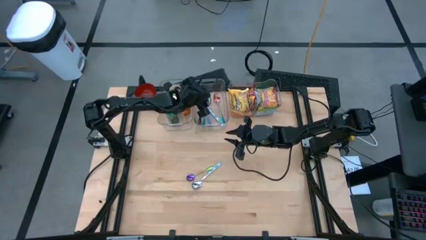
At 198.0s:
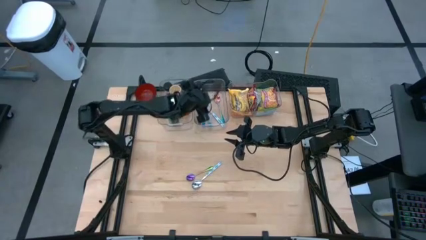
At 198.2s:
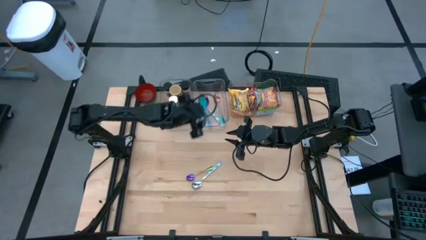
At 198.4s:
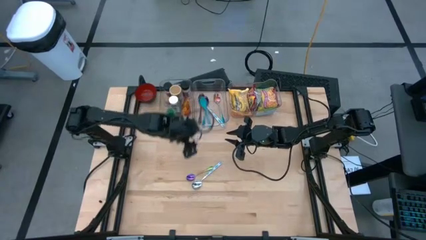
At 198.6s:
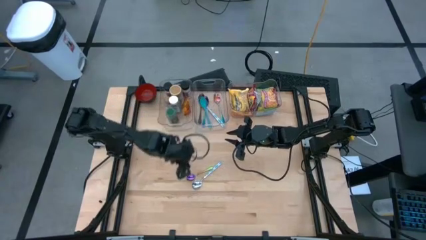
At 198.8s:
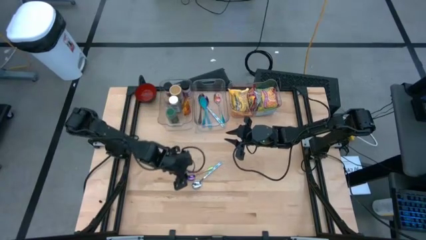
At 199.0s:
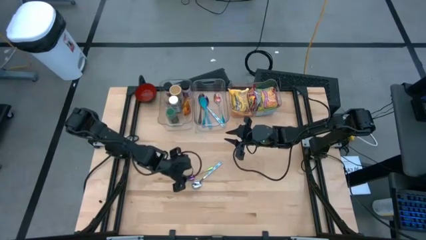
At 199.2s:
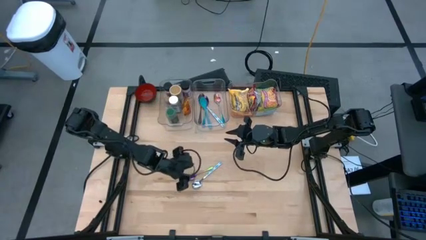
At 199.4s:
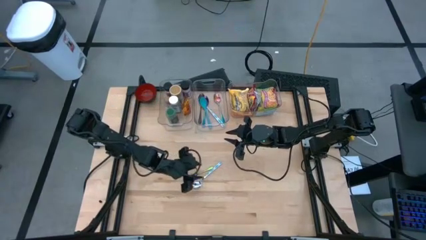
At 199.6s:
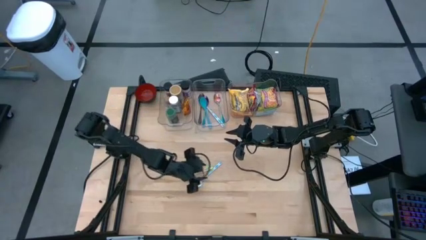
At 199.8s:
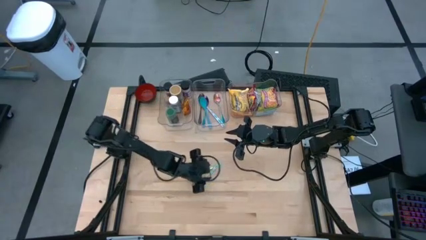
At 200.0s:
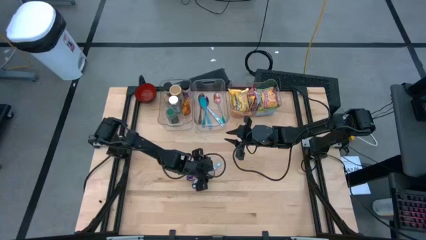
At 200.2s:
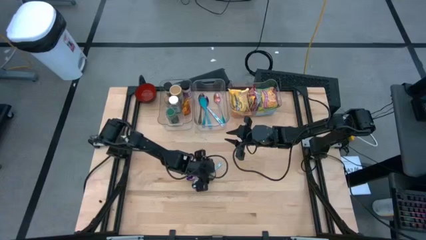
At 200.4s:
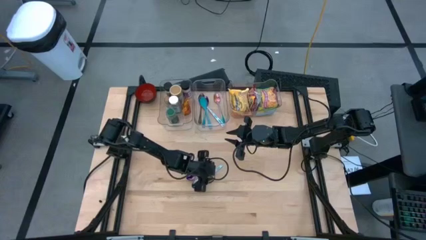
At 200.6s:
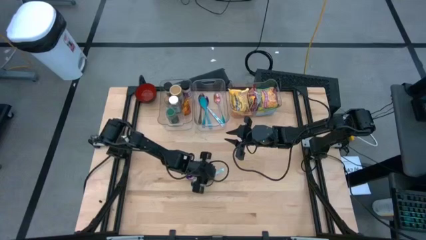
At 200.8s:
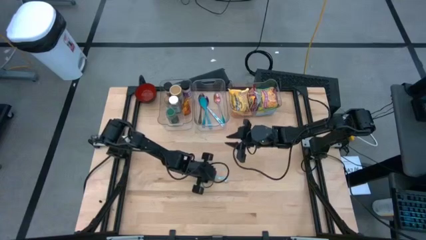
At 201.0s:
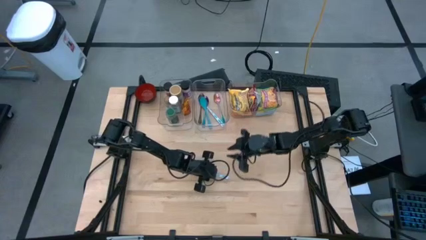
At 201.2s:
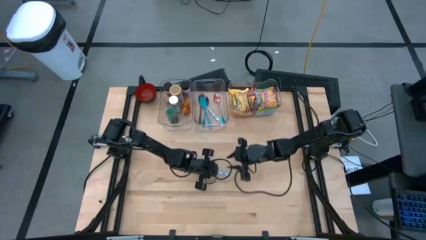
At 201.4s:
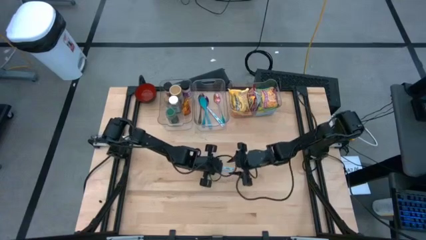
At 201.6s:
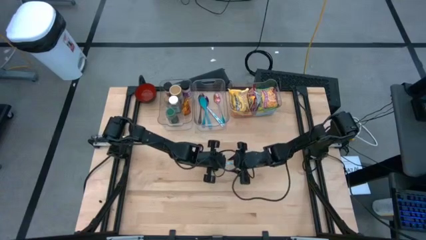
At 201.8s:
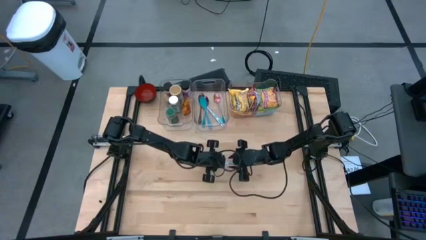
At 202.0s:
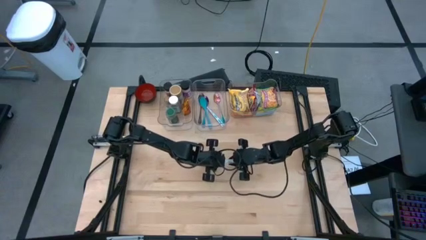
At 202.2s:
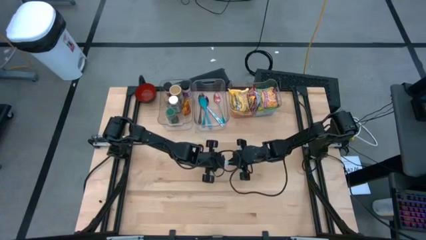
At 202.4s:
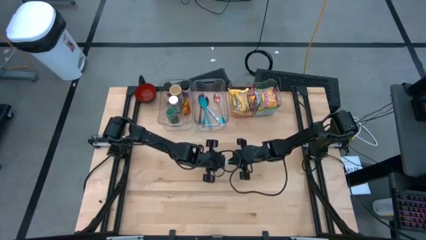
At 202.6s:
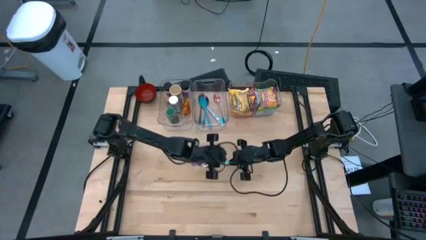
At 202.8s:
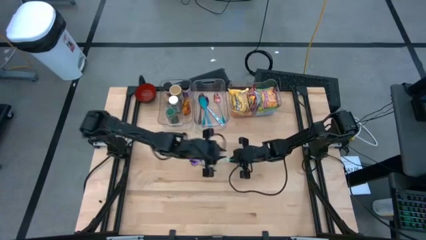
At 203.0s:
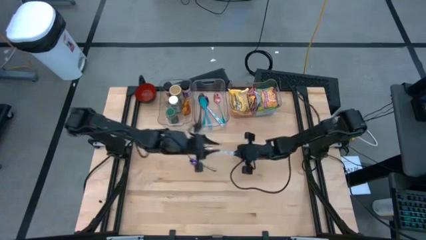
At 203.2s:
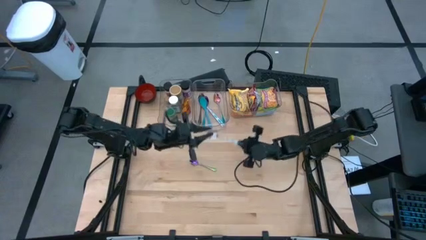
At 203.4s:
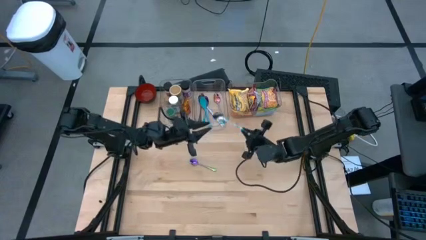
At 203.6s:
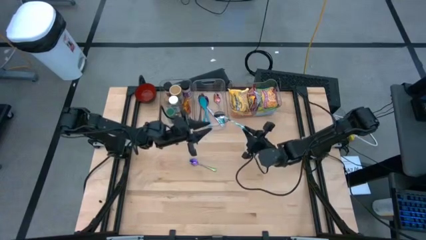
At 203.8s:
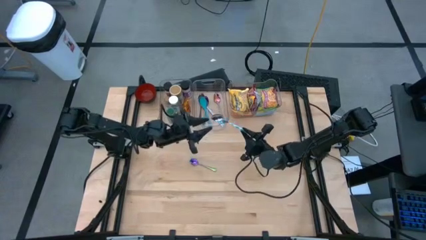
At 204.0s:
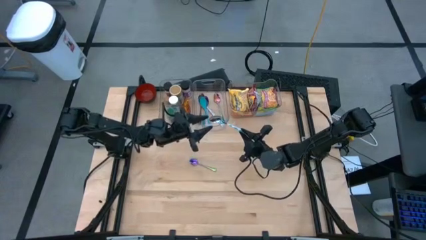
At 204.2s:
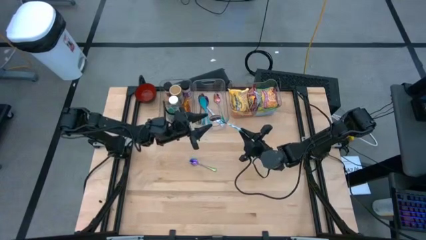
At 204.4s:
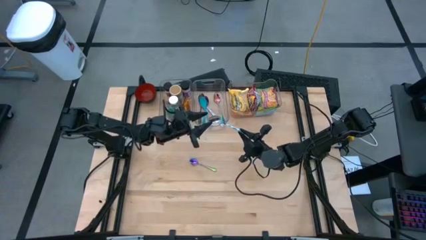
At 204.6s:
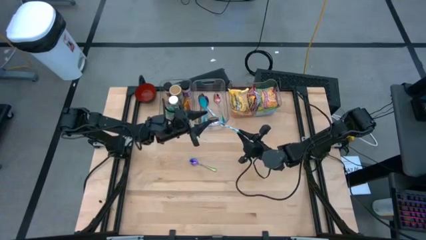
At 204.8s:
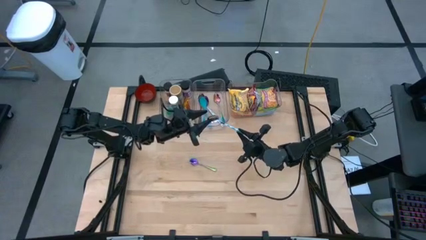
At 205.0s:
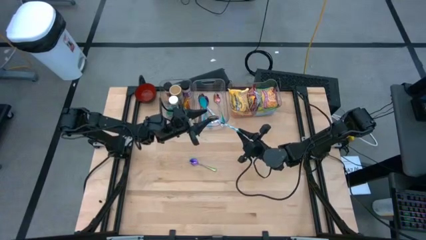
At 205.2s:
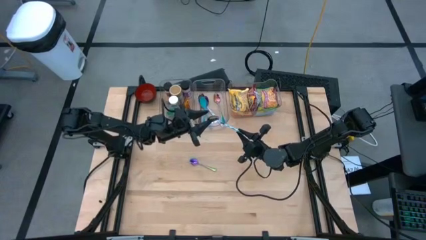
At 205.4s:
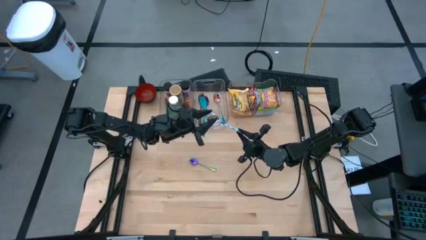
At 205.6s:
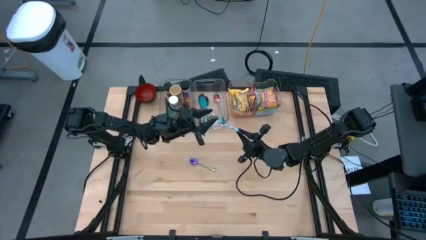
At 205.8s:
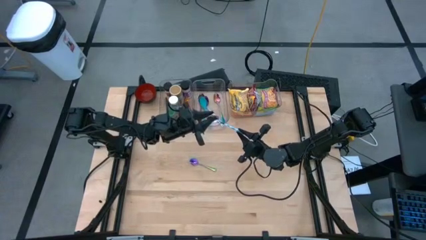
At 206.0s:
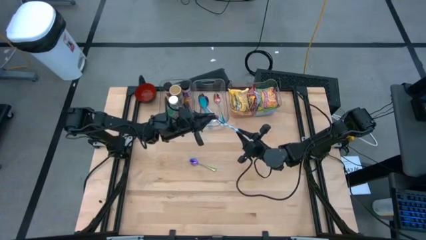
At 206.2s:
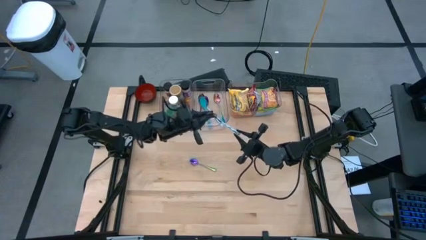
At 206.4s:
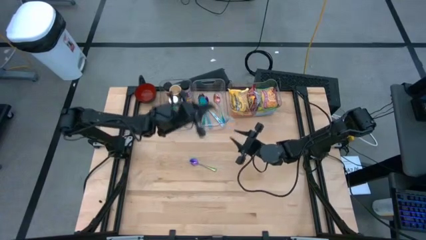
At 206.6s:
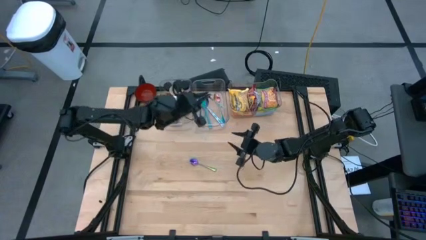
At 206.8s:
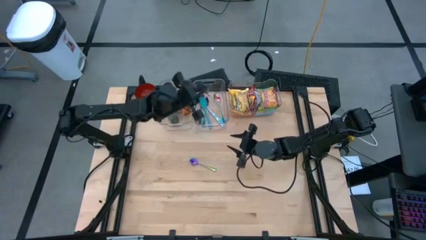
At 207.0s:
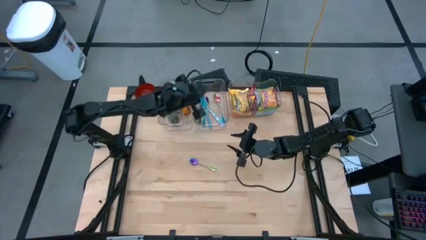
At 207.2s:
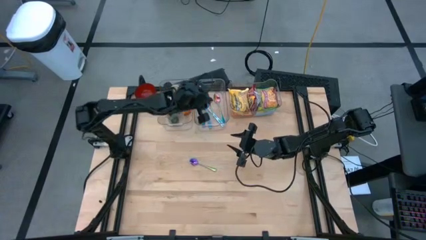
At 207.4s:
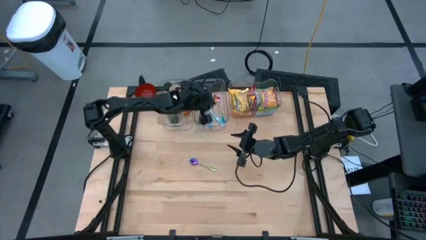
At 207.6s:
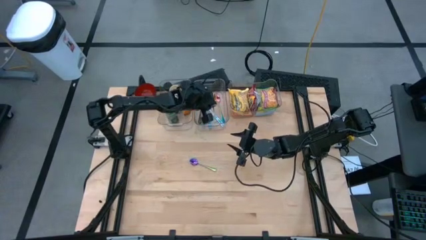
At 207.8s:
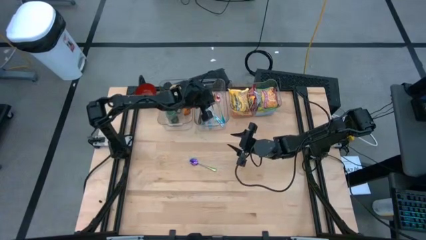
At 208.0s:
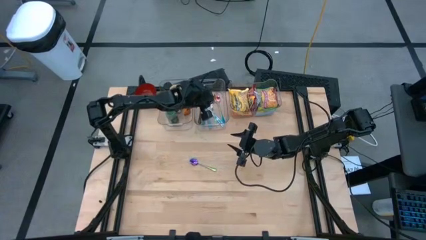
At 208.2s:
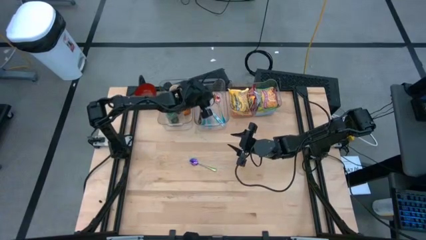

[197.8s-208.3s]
Task: Pick & Place Food Item
Put the white and blue spoon into the middle transparent bin

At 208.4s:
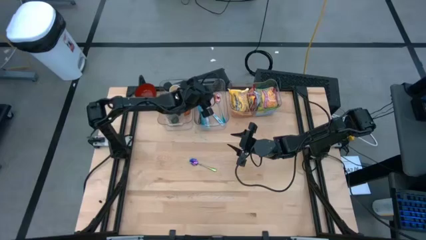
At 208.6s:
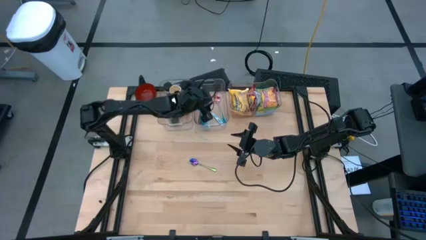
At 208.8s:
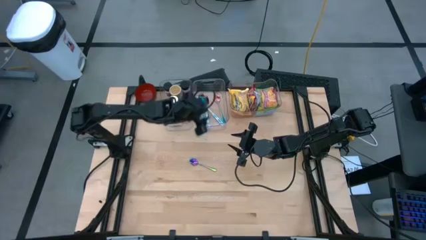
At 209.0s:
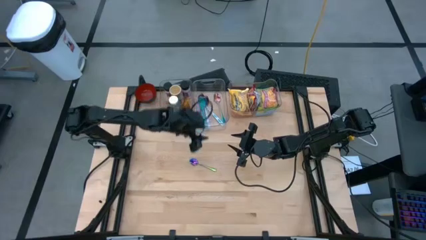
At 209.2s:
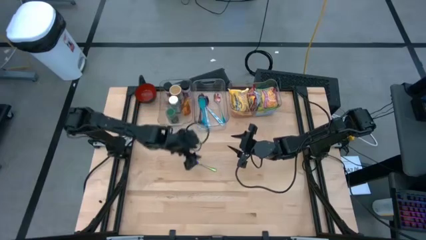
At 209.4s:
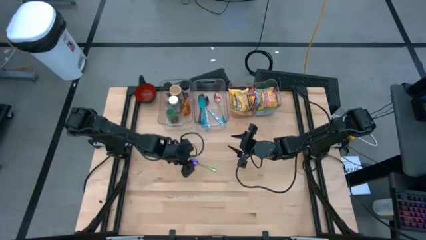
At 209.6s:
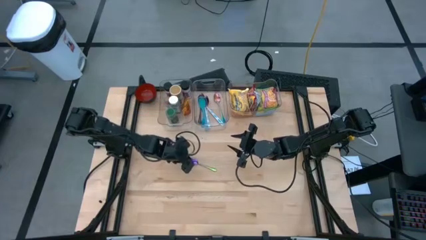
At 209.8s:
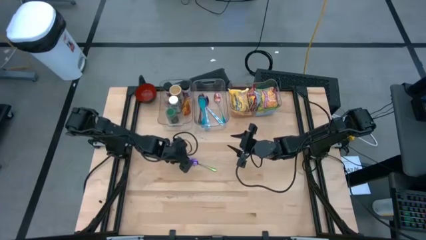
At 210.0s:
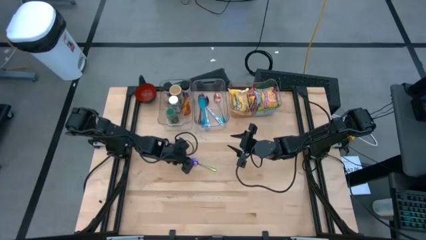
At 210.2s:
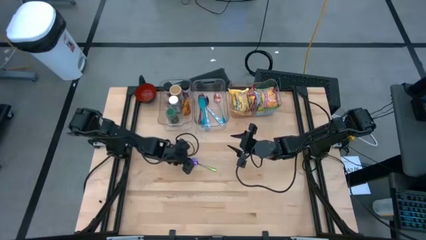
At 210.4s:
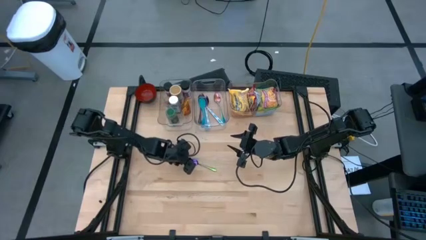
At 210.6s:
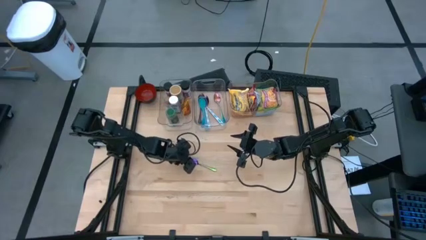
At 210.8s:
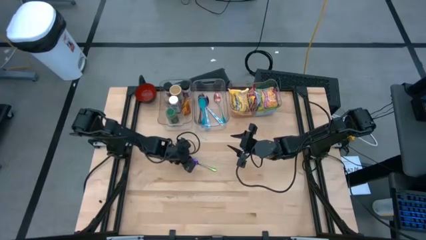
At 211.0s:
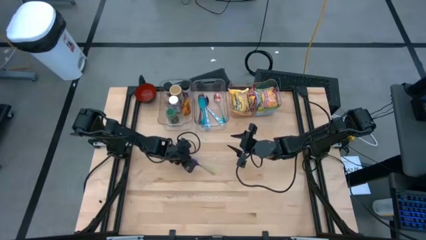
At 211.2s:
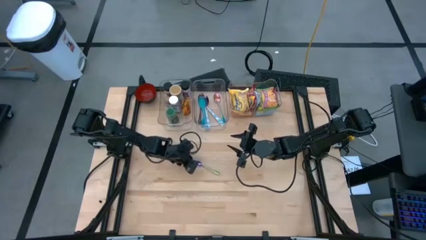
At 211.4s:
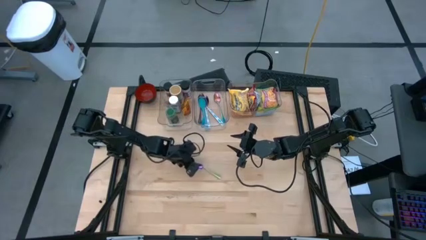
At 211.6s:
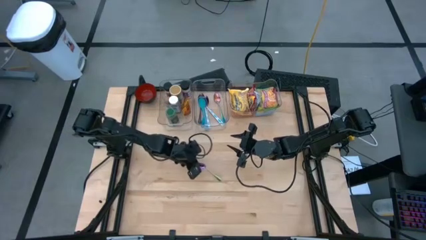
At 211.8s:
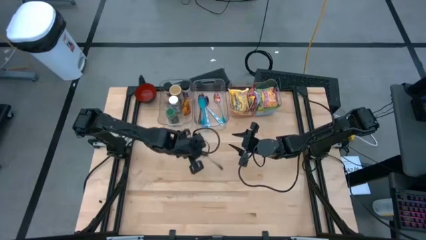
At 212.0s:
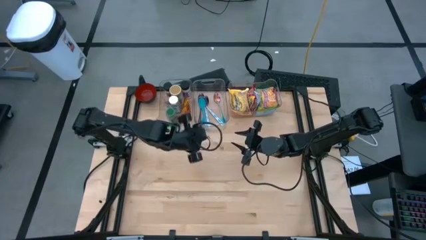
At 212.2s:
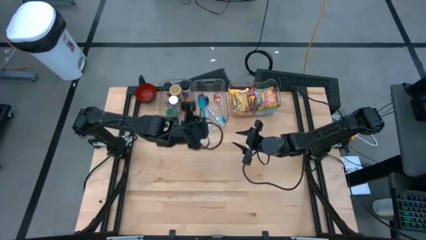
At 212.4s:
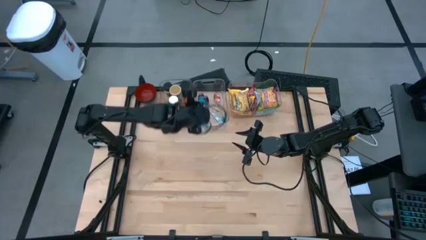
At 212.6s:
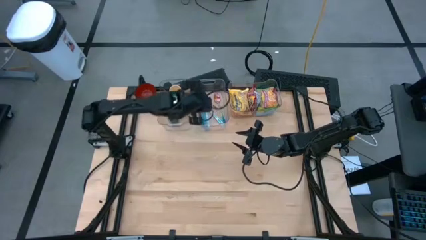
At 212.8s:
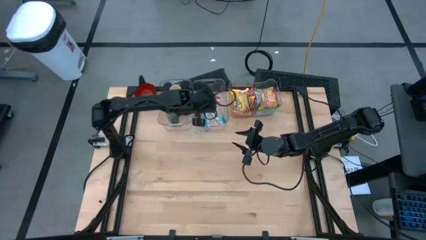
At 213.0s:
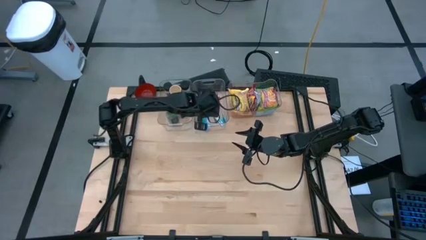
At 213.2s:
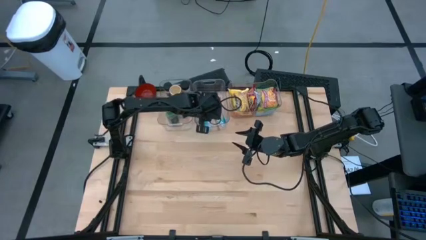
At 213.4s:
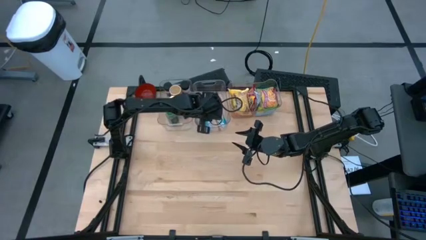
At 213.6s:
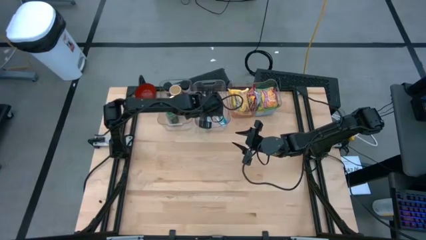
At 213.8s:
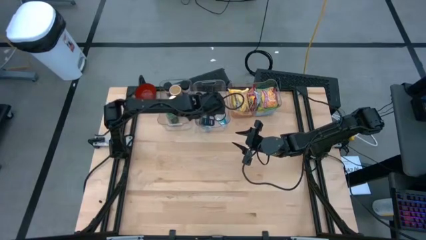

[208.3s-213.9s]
Put the purple spoon into the middle transparent bin
